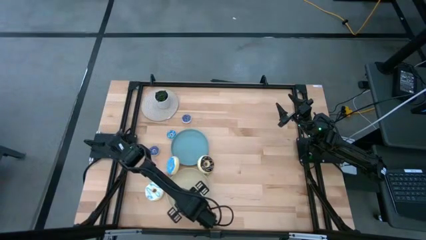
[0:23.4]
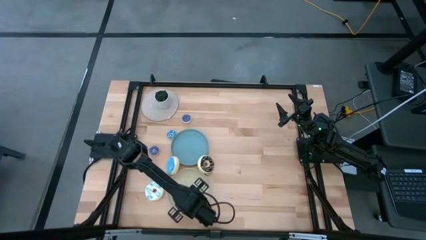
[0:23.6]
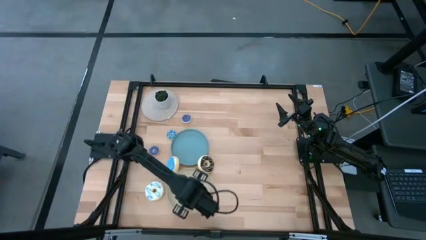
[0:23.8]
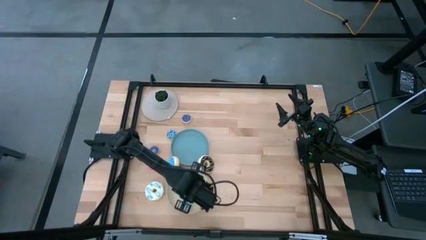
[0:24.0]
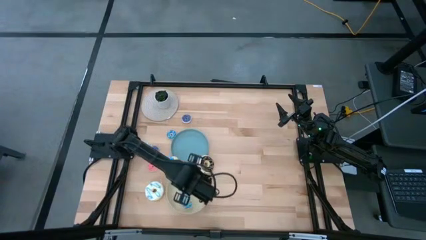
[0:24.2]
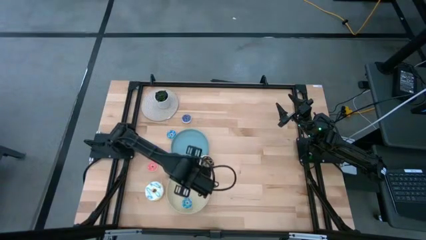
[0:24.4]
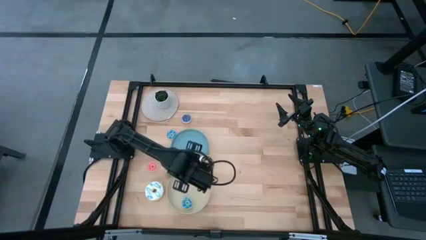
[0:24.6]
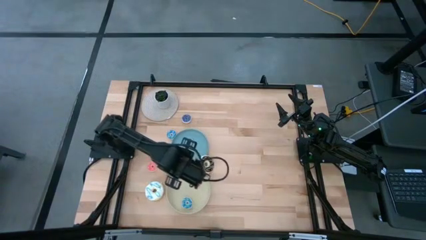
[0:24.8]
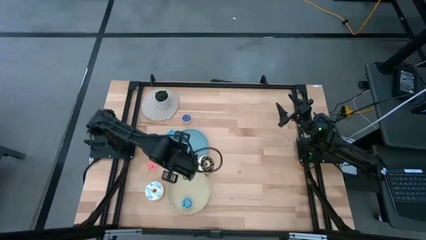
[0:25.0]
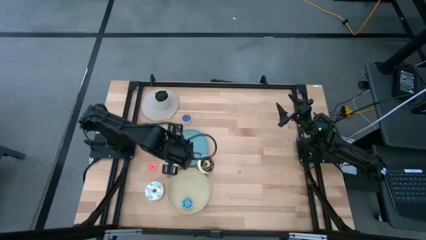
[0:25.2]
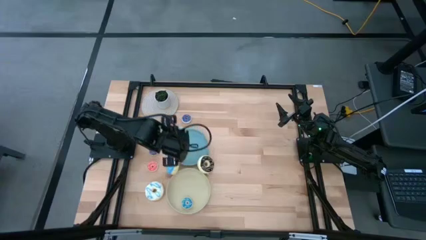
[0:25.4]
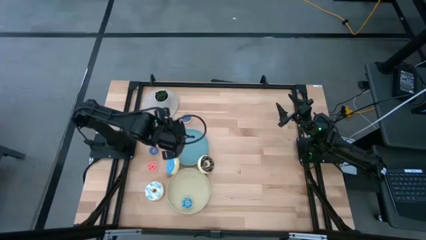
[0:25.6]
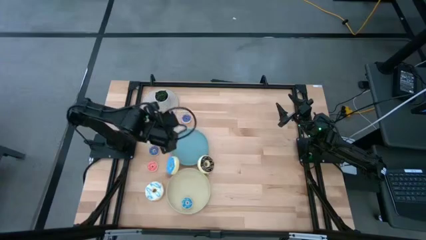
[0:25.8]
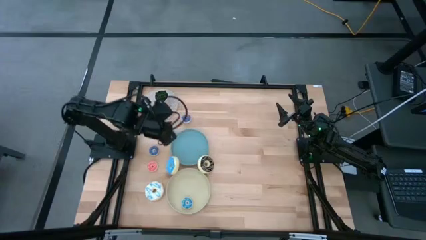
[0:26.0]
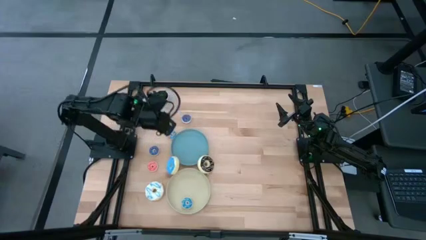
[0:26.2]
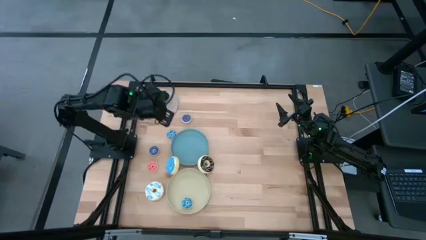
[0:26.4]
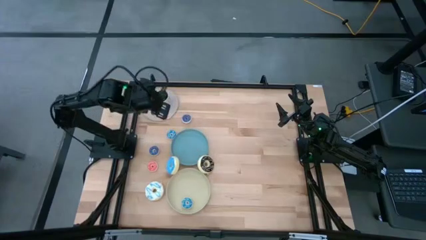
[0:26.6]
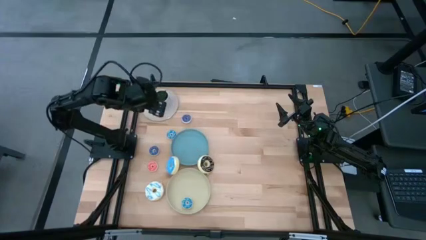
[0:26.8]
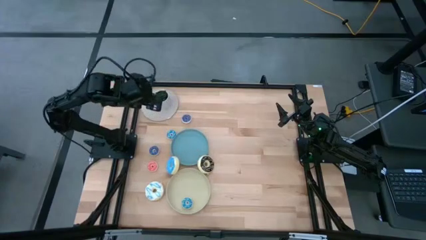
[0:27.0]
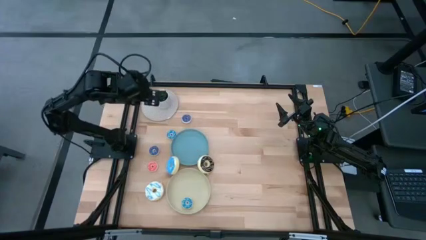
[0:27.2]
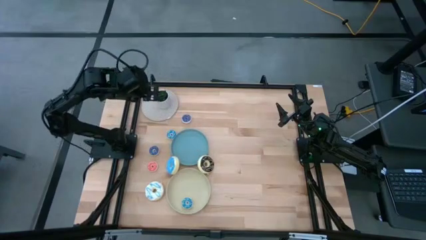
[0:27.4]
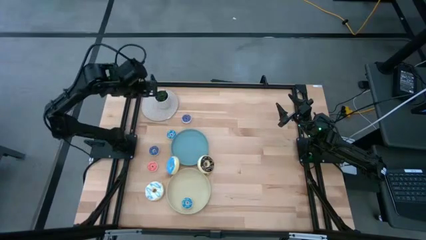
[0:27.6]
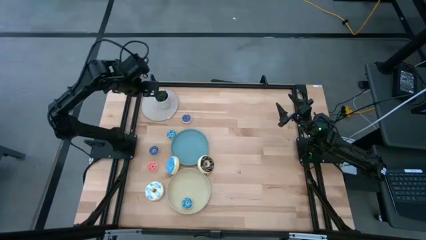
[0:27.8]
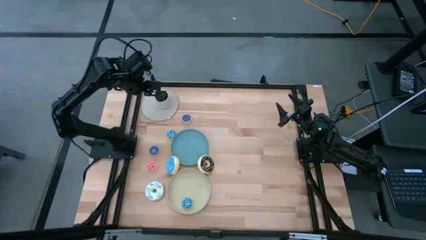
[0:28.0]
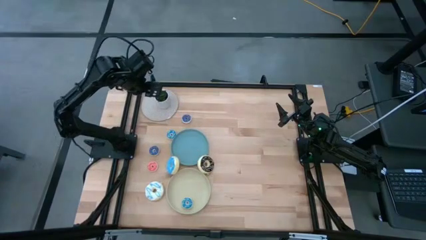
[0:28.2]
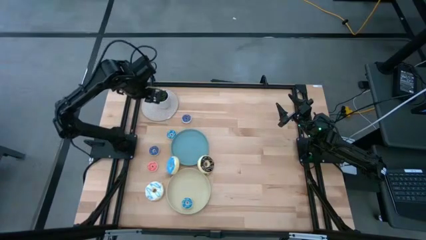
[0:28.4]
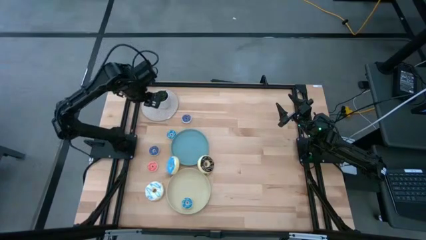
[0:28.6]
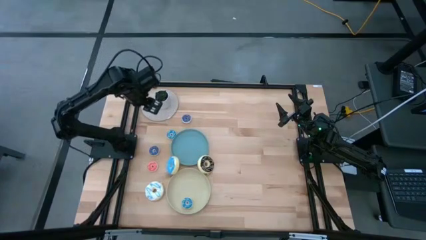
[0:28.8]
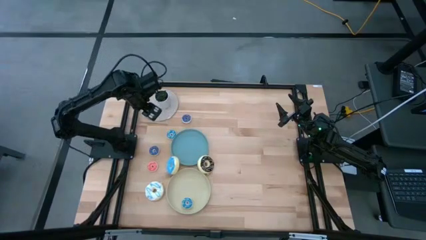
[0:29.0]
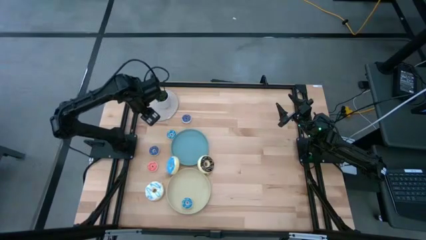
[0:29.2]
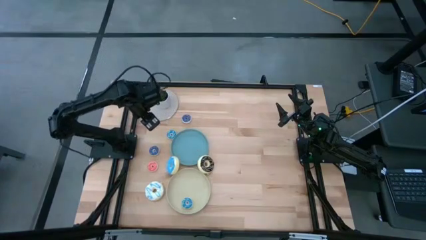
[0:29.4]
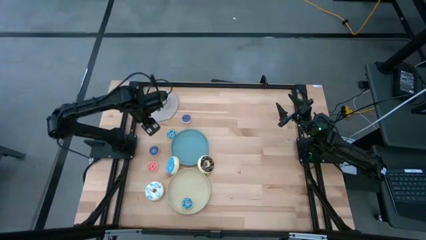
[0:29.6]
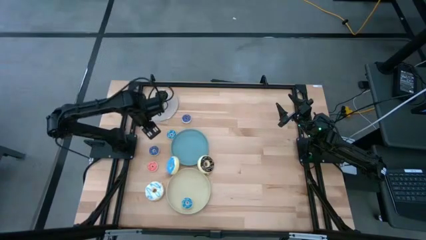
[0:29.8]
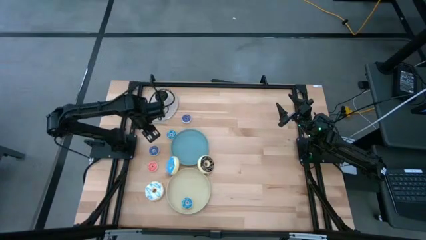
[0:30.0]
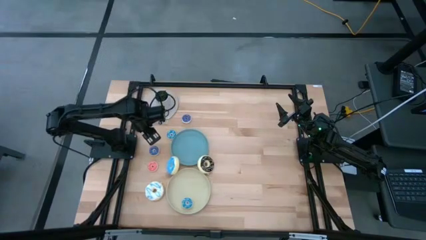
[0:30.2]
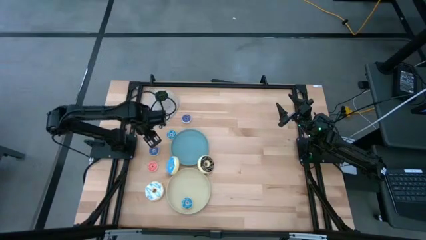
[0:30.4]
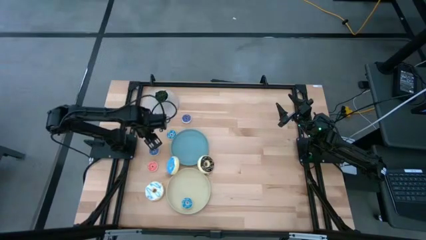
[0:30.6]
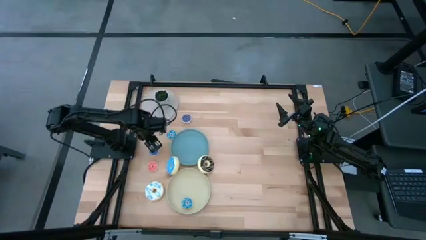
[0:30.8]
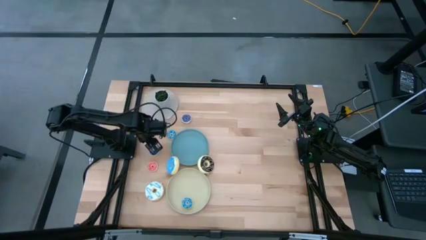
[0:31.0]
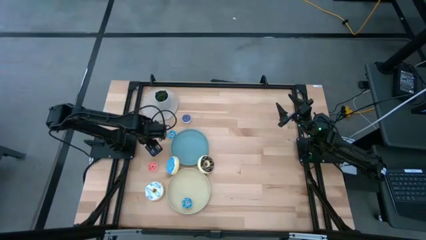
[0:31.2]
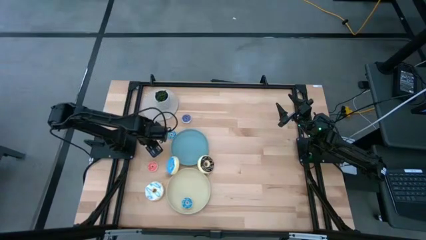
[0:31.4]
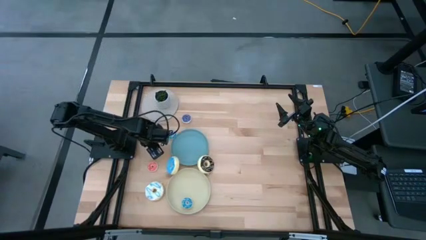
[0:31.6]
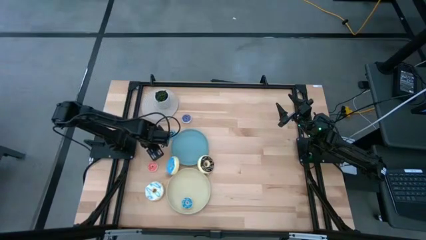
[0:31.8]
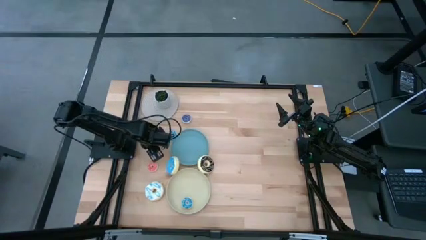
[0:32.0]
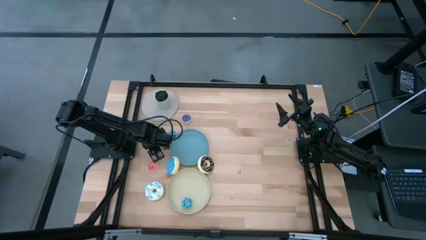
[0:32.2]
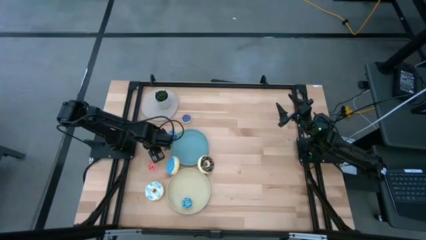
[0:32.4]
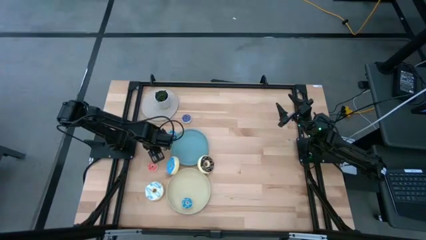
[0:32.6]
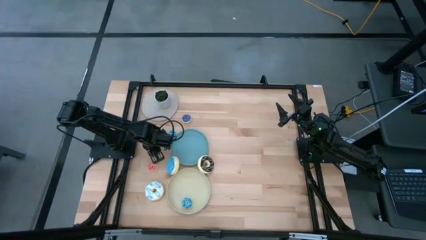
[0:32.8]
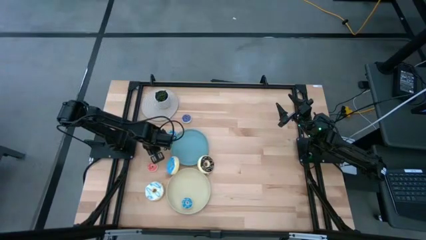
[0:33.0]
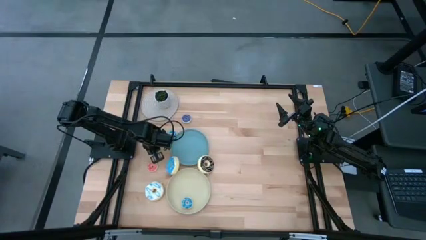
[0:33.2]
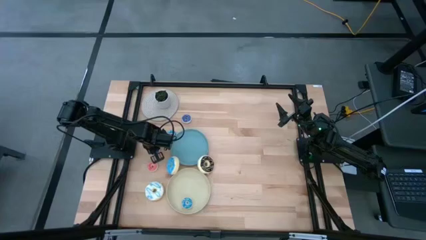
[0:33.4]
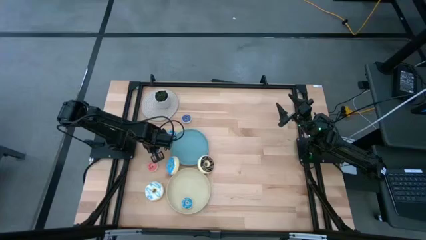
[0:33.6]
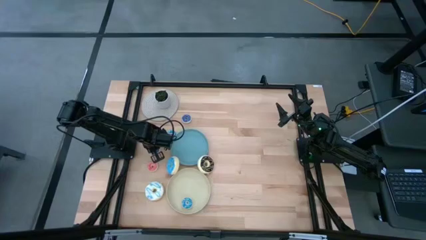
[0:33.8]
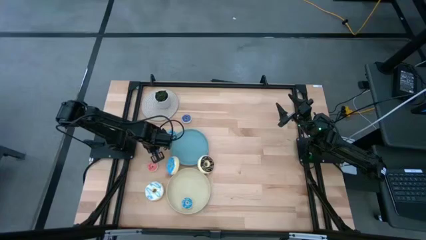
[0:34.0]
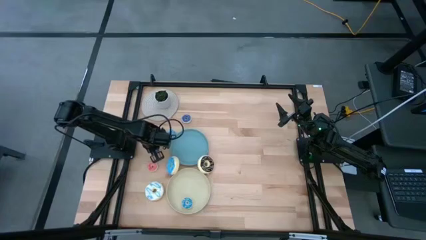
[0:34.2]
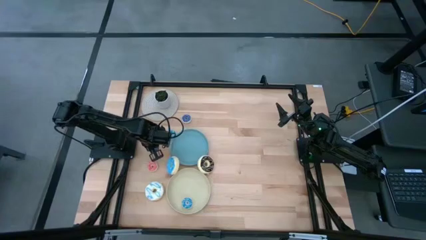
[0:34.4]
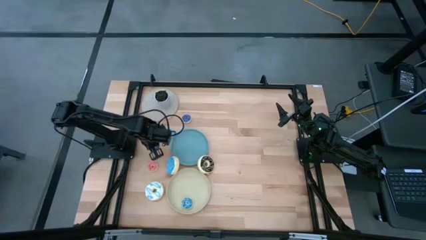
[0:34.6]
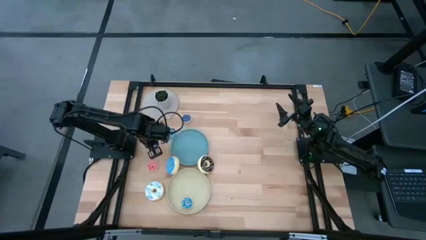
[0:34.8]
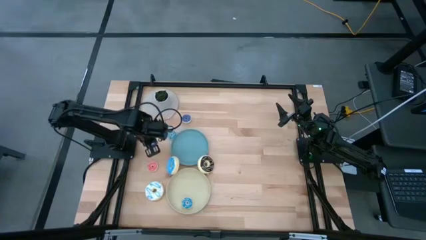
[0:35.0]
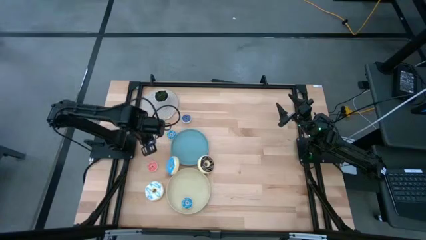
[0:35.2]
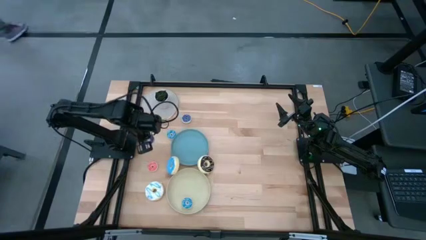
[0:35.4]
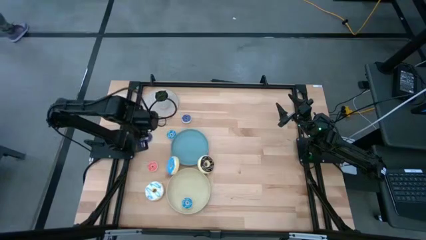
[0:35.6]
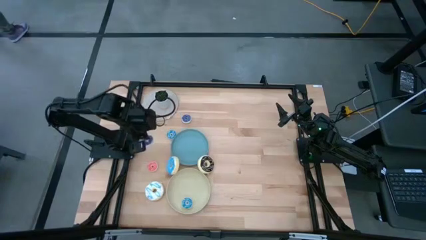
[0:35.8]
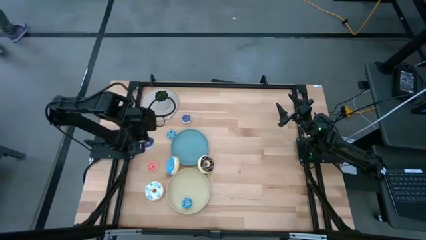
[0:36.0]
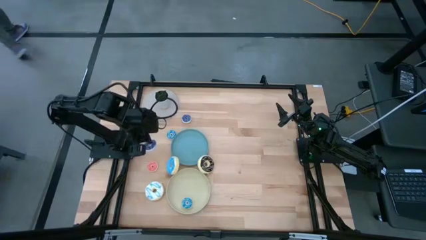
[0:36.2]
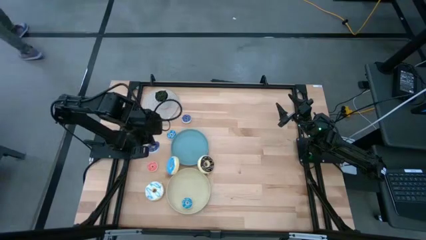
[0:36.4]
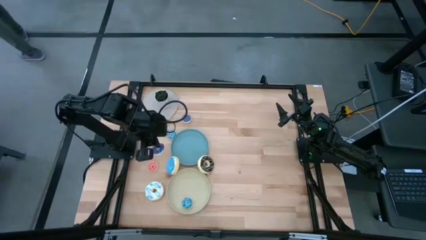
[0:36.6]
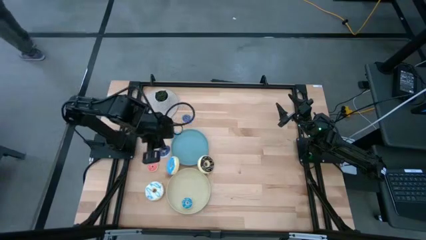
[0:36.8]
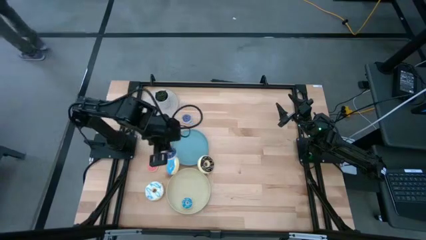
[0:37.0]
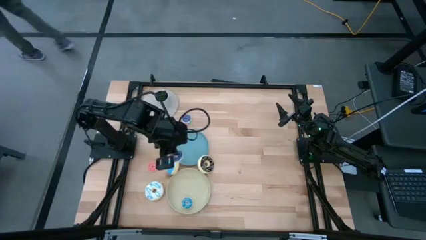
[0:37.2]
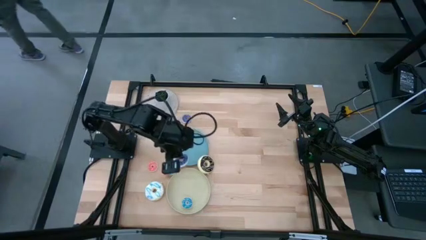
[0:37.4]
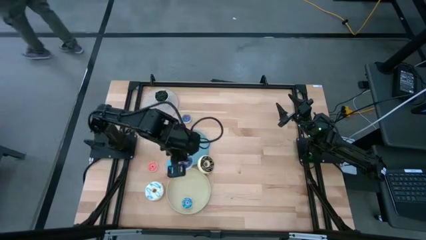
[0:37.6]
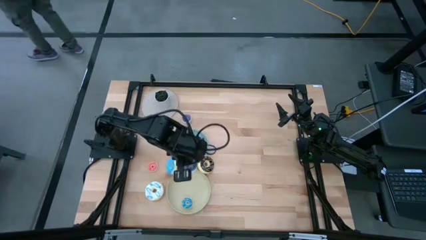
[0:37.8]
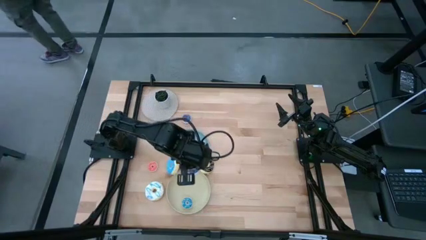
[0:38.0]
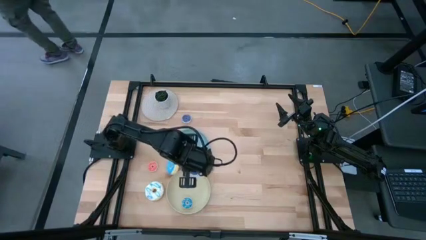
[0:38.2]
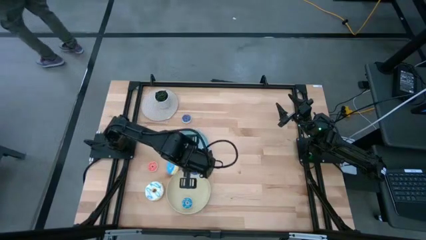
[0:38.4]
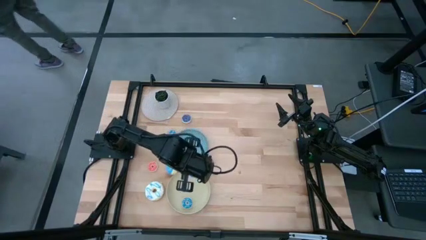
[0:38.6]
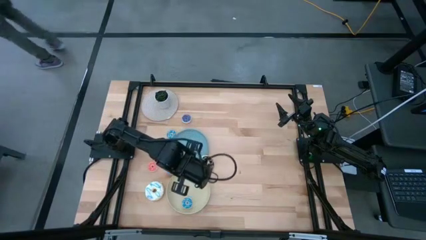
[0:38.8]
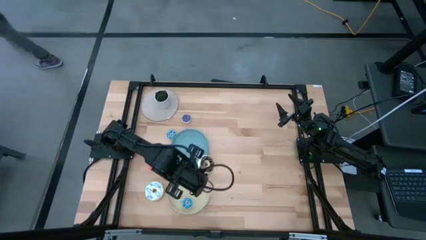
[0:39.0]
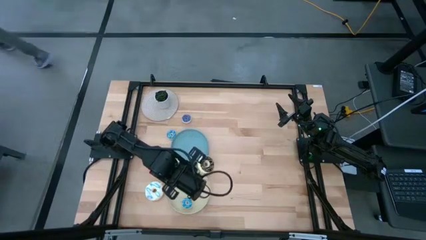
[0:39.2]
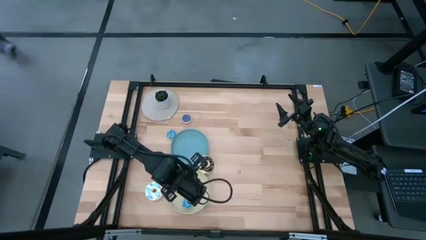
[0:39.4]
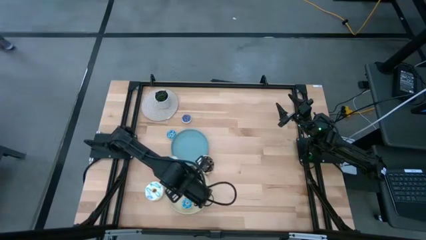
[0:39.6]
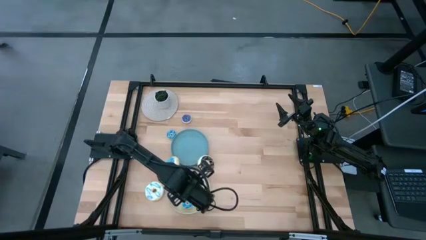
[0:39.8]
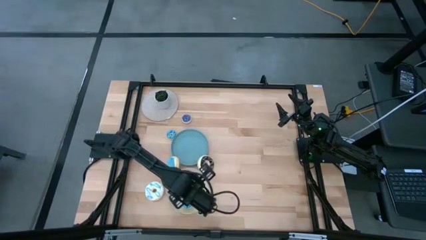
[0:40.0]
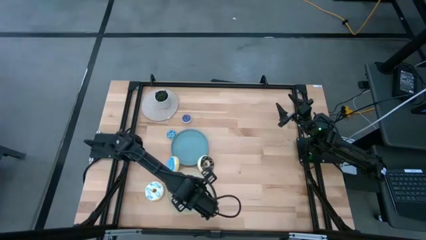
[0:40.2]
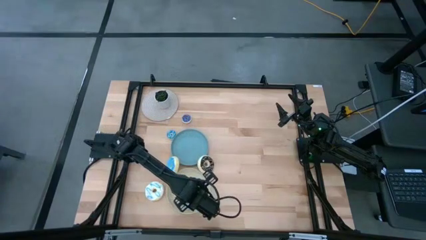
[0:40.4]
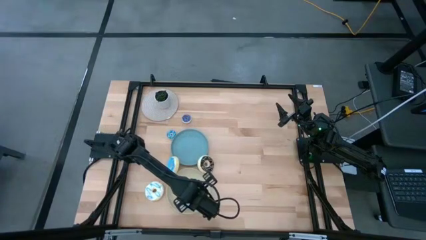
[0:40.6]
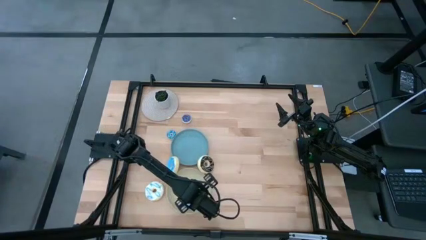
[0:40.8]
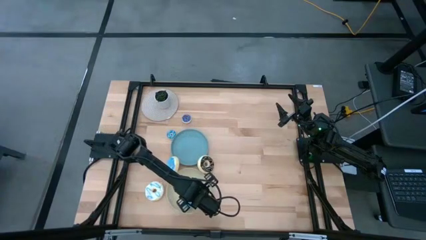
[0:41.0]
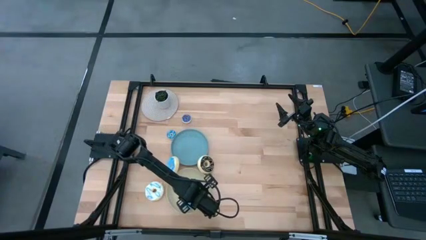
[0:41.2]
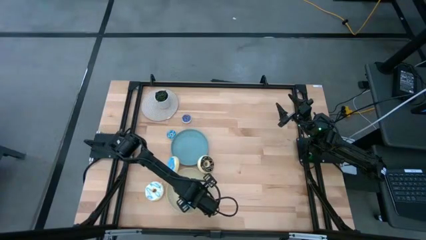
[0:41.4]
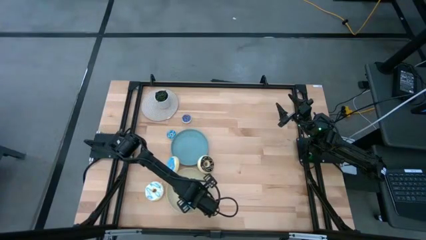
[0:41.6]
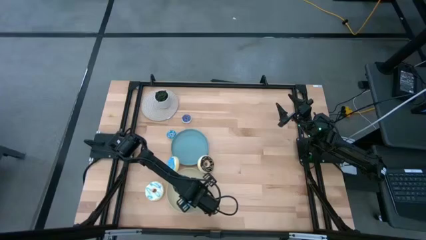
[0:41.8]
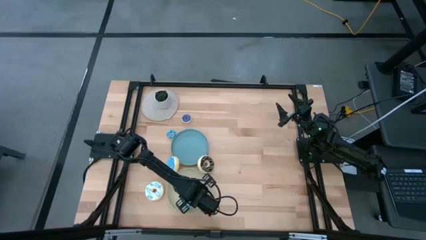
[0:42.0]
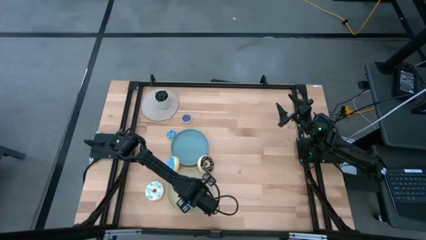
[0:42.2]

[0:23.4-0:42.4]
Task: Pick & Place donuts
Put the left small blue donut on the gray plate
